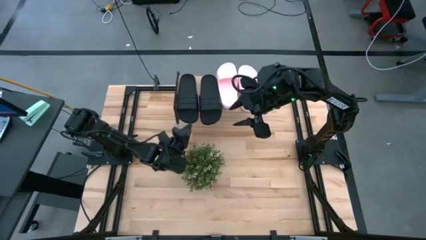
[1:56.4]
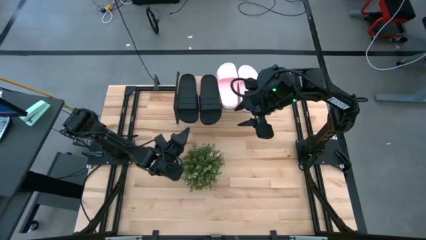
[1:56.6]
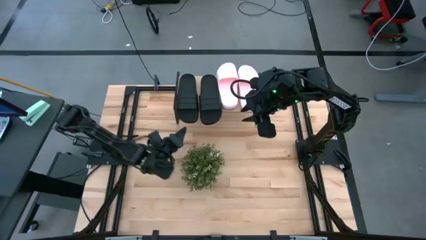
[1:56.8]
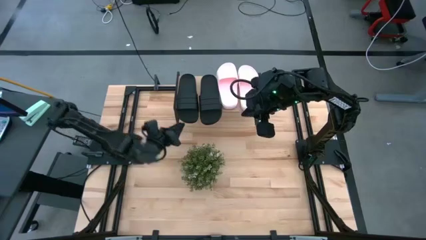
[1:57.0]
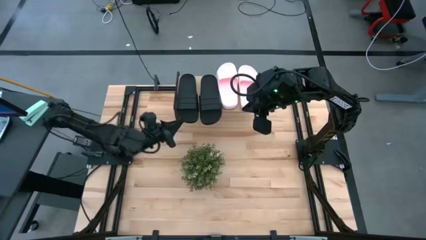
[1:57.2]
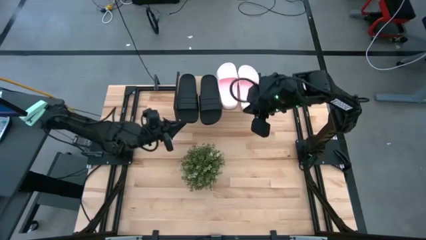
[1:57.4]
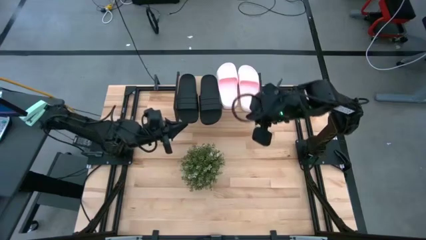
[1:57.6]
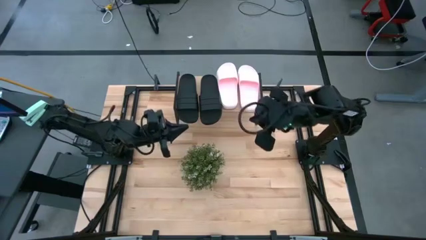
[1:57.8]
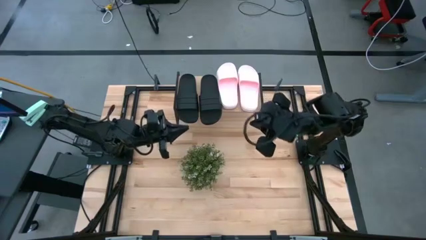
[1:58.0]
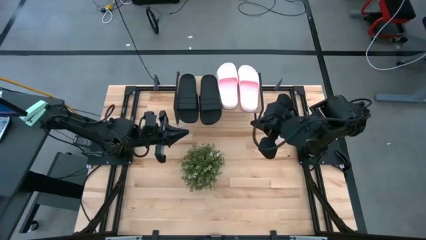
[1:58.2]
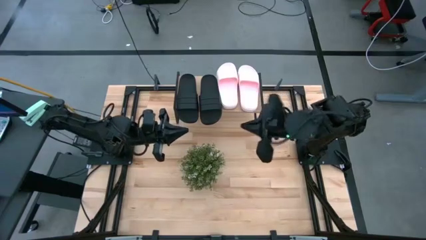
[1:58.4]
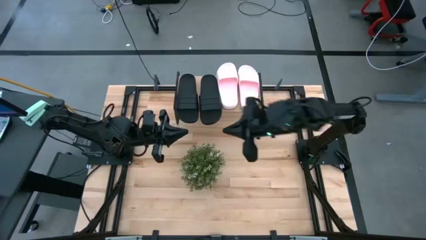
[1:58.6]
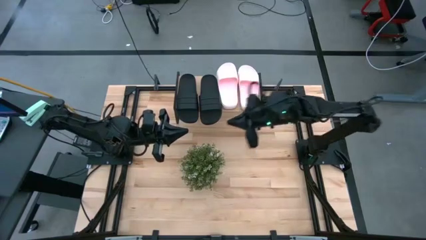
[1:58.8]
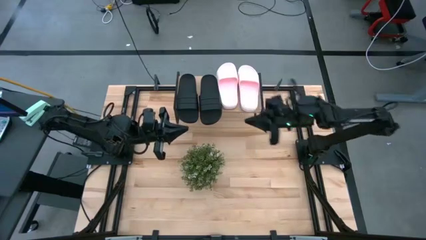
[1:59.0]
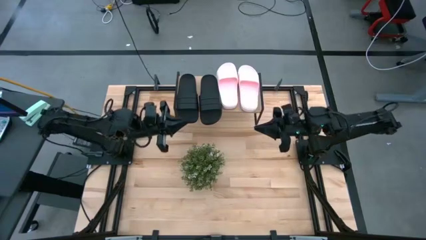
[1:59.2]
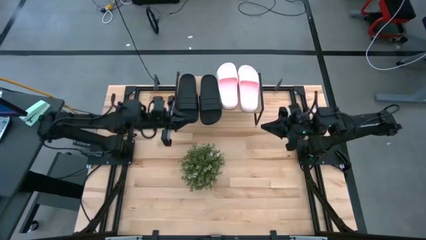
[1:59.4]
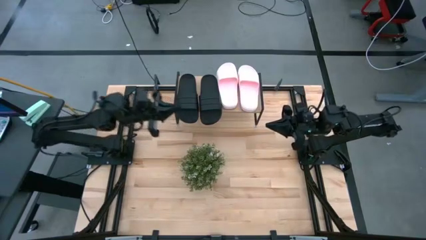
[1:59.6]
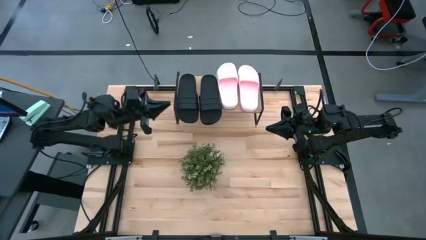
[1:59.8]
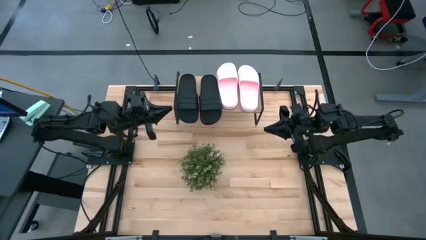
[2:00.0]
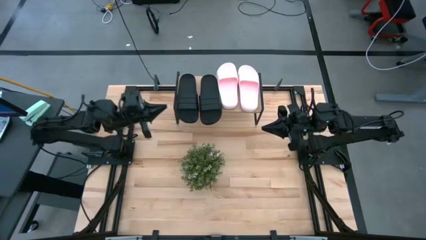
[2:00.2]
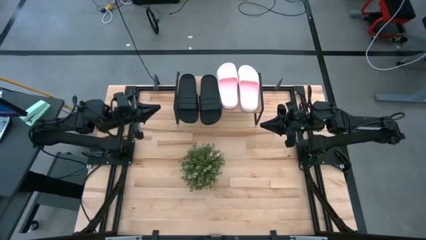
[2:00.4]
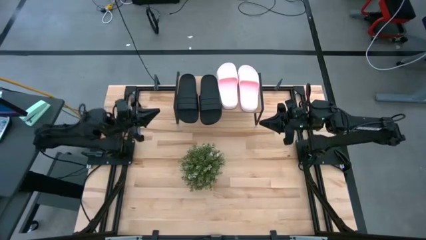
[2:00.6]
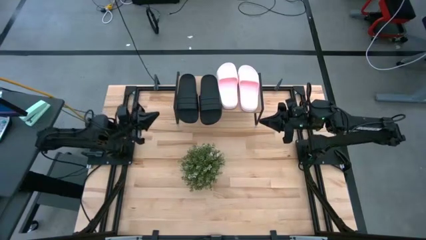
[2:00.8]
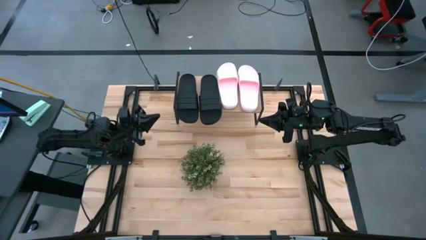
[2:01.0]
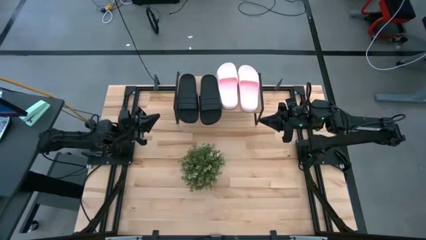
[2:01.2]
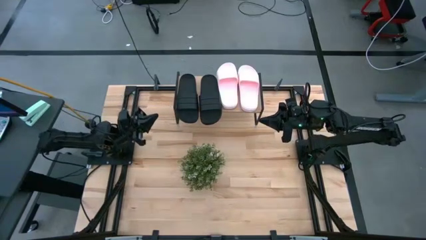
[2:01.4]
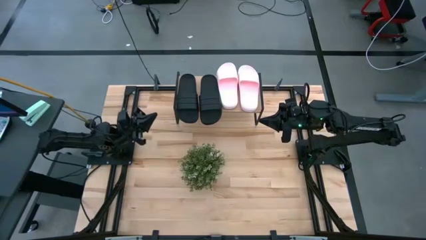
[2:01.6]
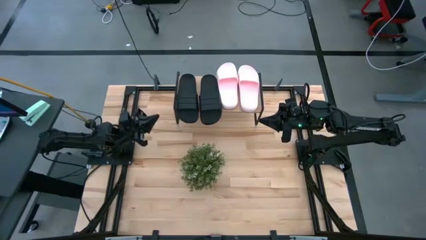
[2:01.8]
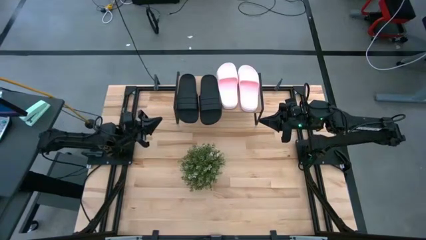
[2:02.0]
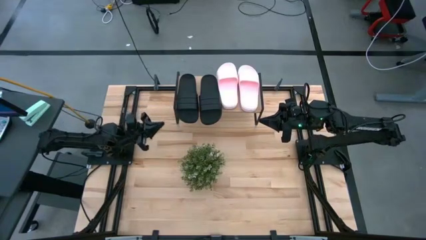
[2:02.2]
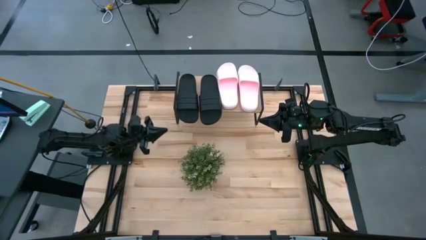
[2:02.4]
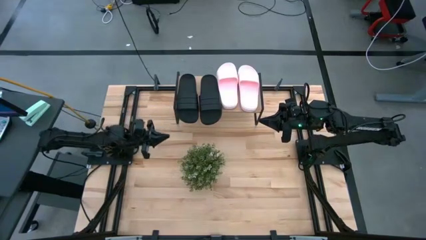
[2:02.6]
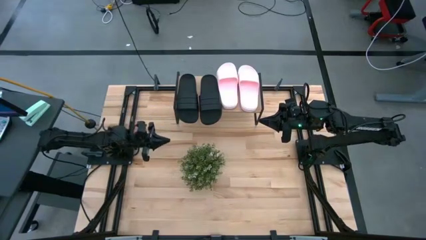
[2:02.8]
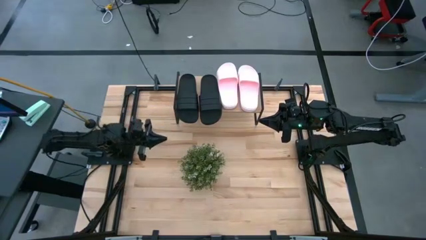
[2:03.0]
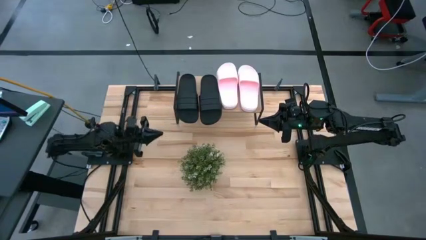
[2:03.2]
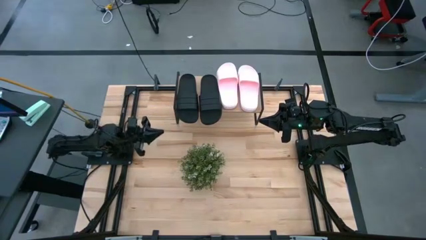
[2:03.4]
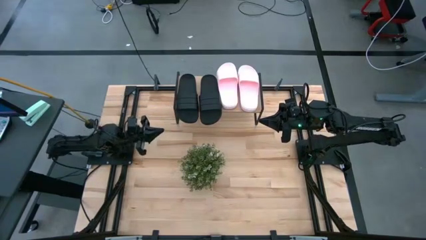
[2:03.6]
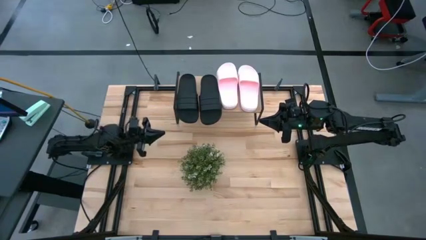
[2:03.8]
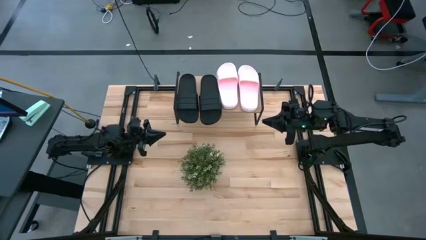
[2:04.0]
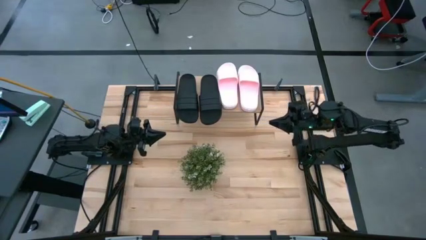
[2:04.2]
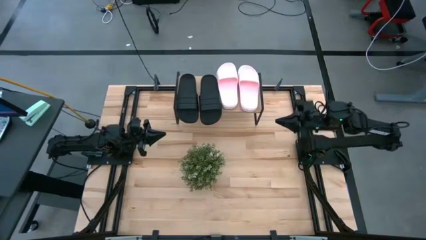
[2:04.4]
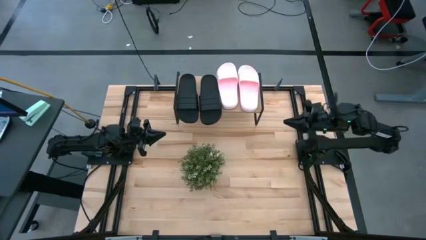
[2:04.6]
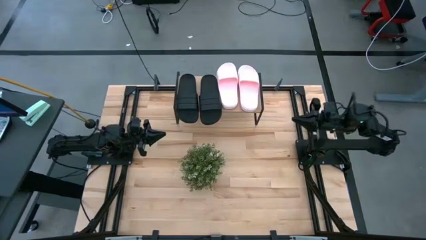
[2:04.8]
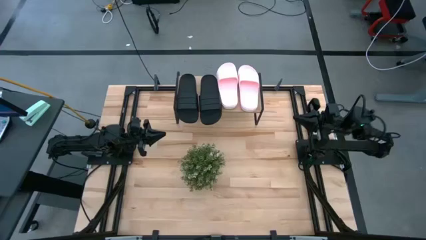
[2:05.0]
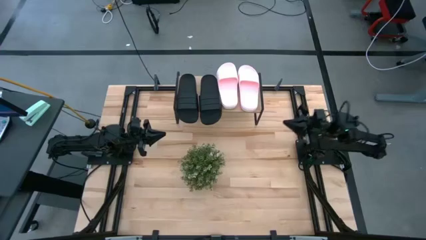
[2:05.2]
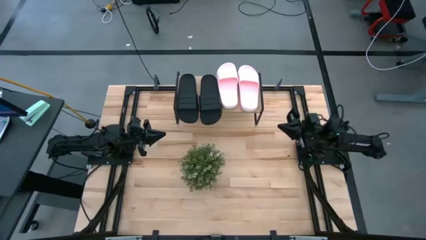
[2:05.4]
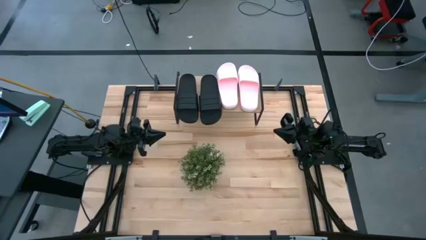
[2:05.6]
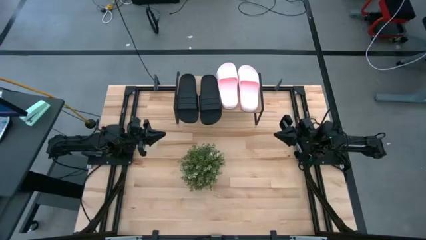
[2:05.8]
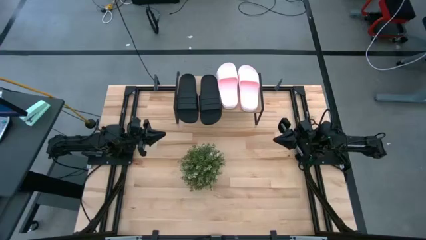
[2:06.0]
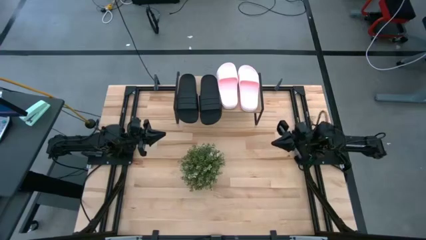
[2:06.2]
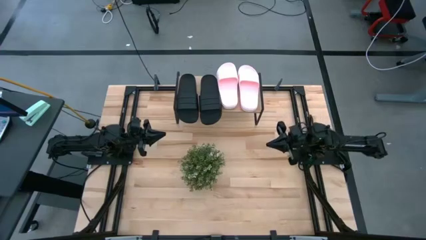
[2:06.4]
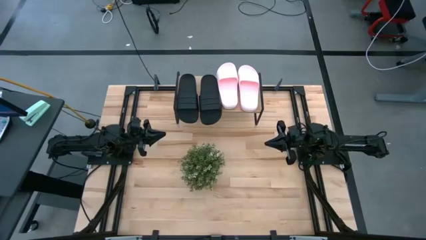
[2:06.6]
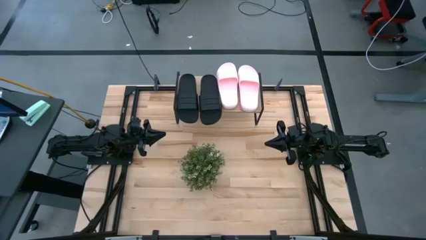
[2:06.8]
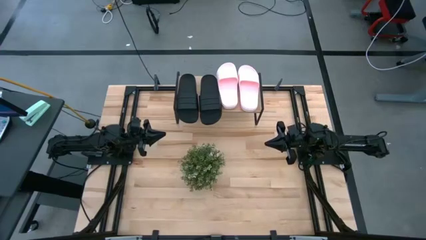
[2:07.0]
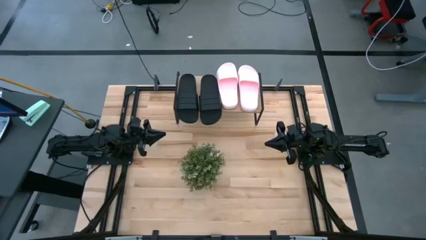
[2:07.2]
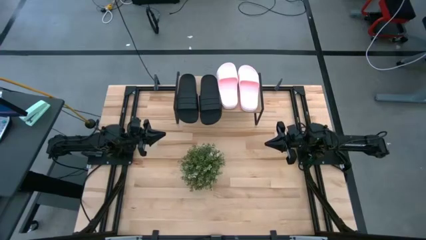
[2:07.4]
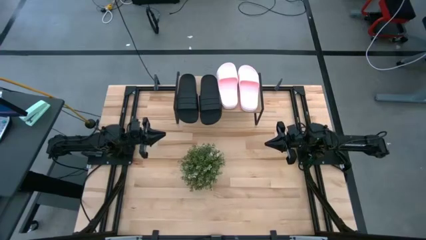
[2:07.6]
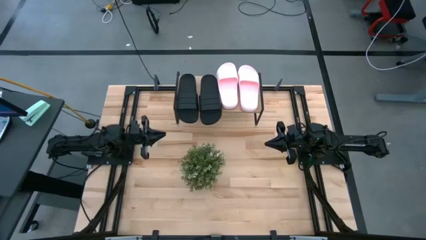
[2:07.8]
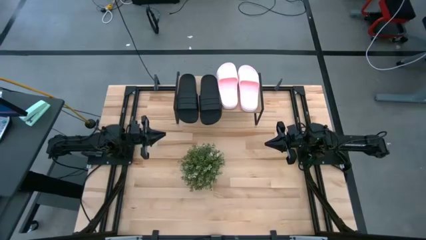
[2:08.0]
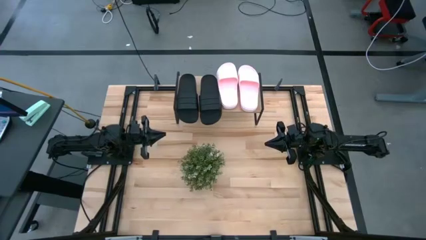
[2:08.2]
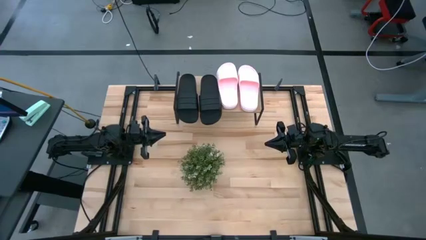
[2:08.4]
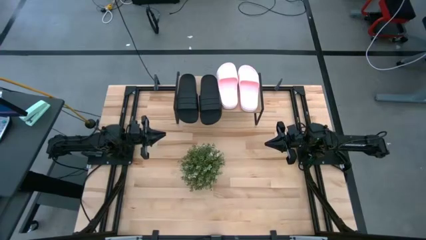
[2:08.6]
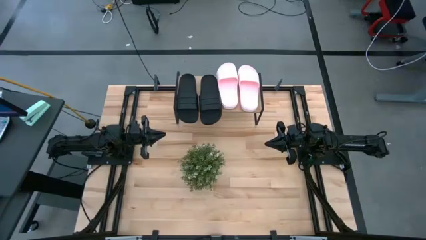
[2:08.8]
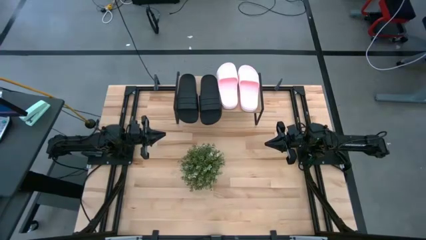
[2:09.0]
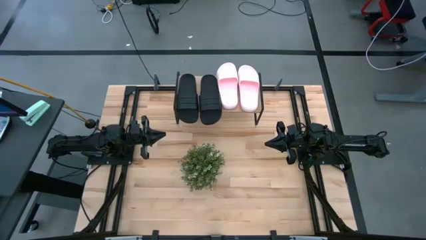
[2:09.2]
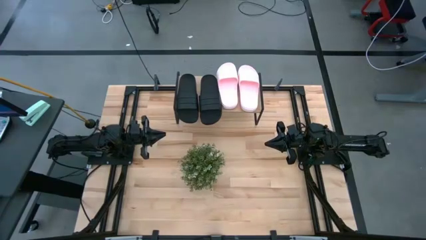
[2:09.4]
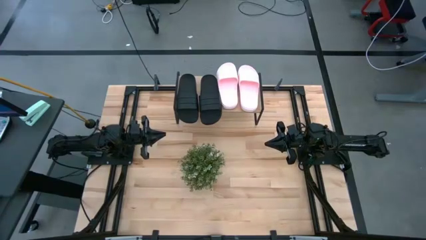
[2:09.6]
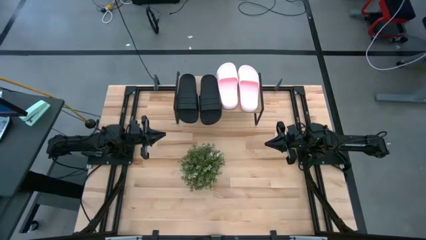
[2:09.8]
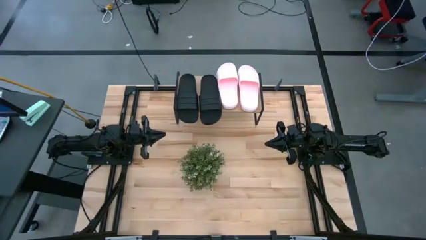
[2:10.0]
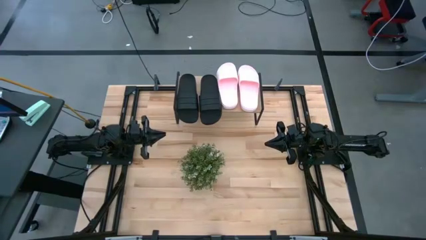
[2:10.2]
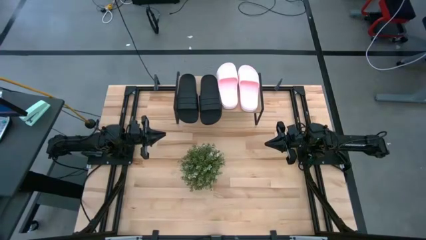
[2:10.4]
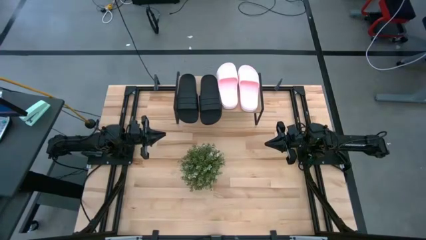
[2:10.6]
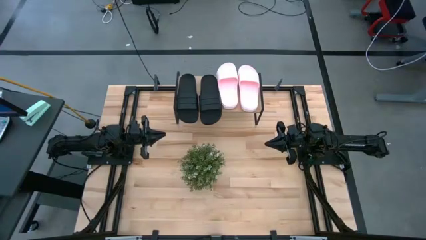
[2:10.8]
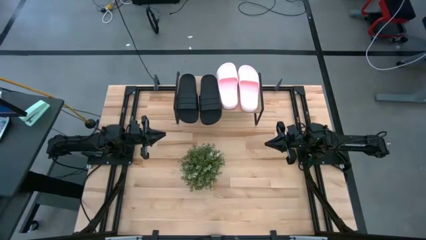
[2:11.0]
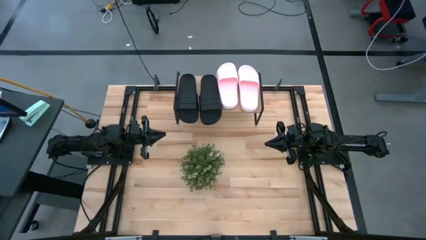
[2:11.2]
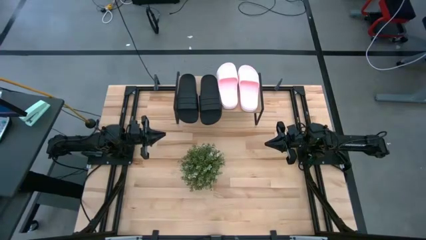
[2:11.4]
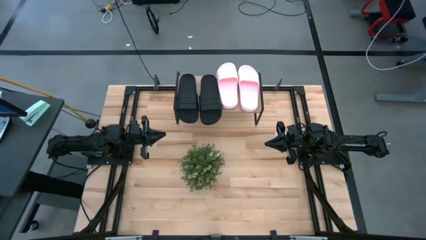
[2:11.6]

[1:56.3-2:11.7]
Task: Pick and place slides into the shelf
Return to Home Position

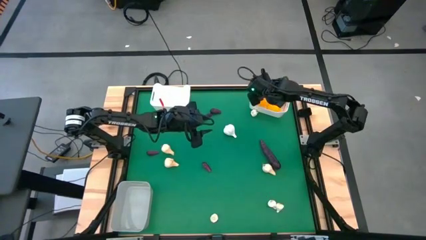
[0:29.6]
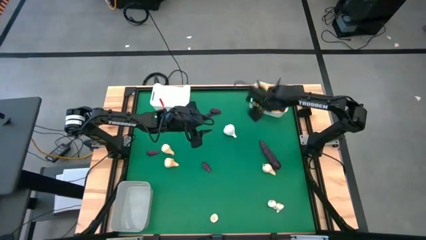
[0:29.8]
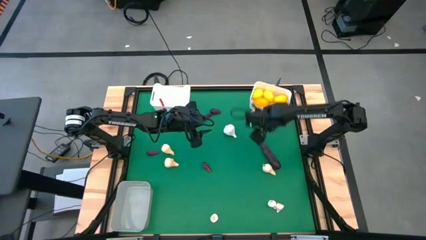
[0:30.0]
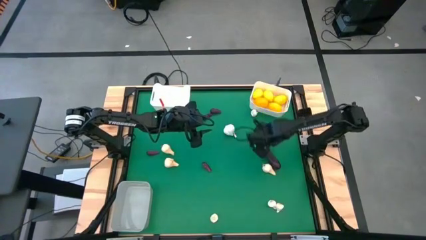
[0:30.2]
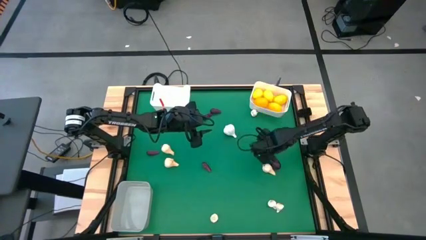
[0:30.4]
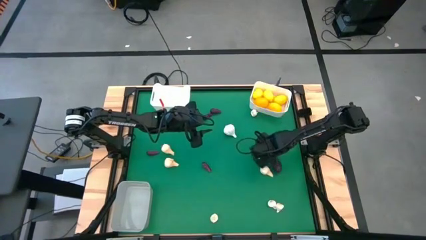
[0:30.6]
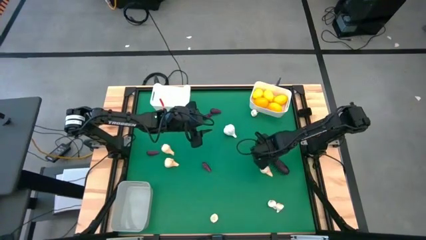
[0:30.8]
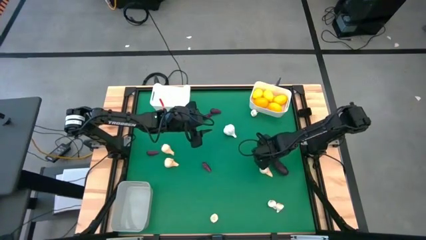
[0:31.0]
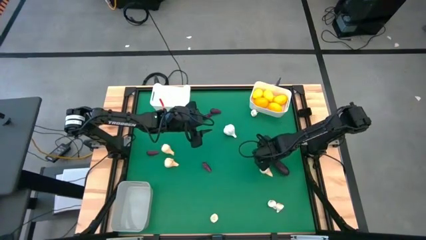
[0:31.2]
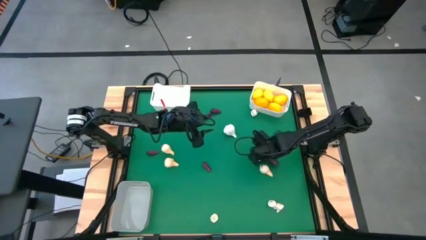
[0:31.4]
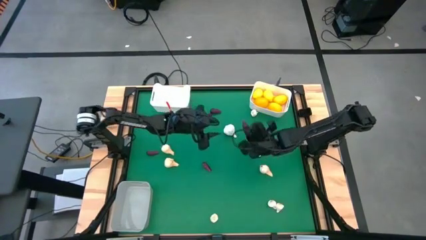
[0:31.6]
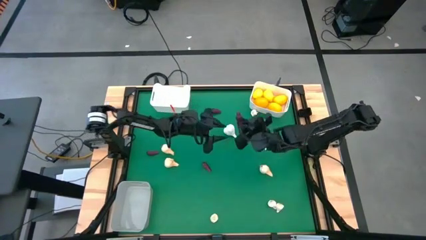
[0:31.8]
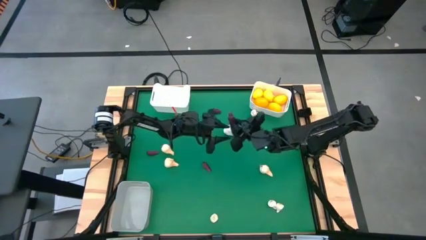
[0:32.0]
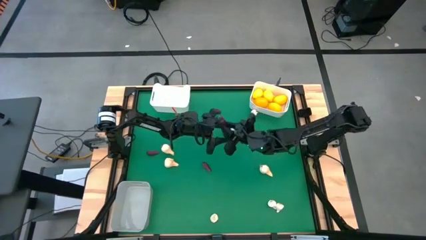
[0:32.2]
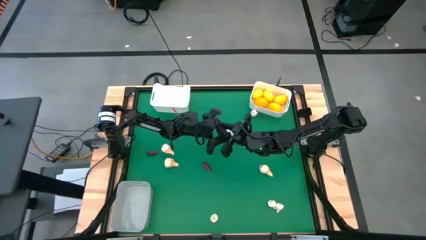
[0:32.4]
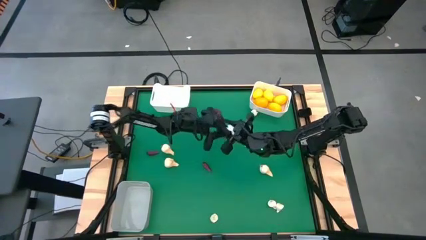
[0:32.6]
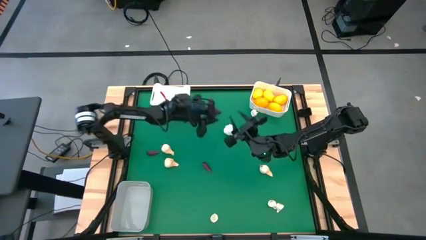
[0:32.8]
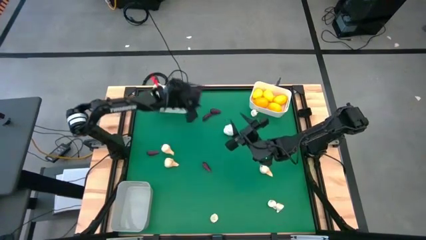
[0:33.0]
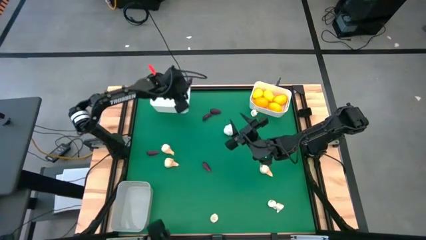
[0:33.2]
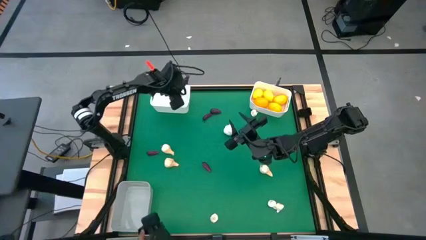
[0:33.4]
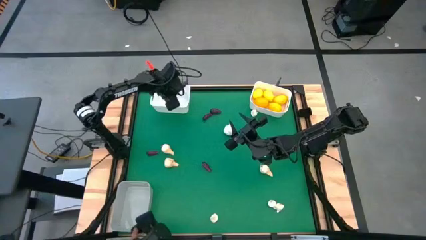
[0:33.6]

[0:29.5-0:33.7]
Task: Sort produce into baskets
Put the bottom right violet eggplant into the left white bin
